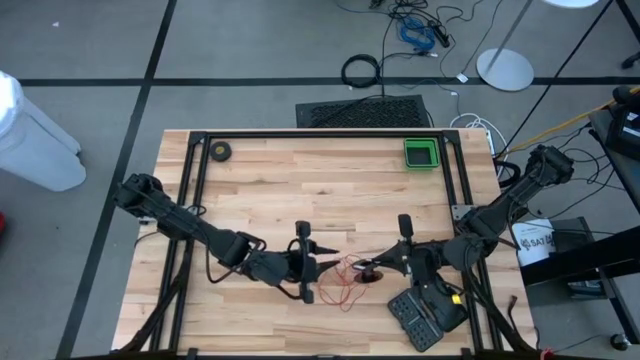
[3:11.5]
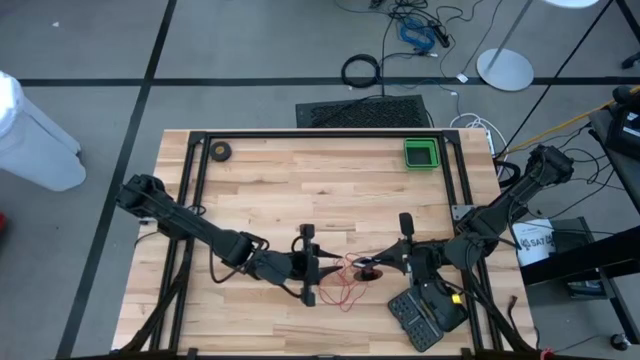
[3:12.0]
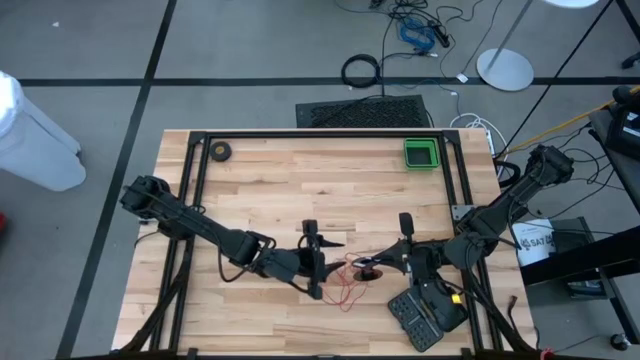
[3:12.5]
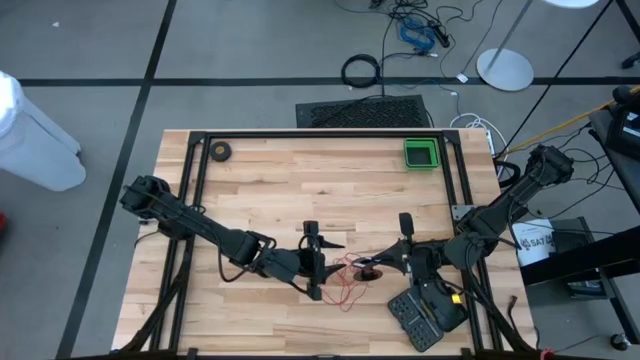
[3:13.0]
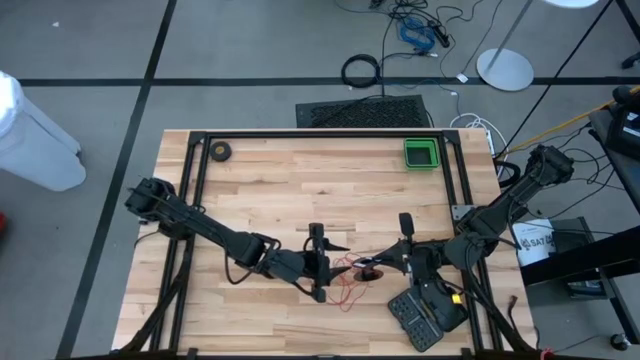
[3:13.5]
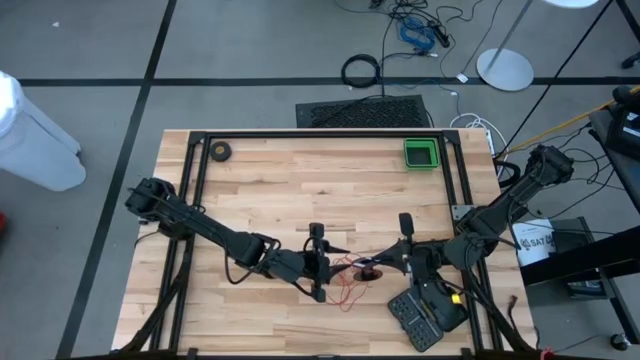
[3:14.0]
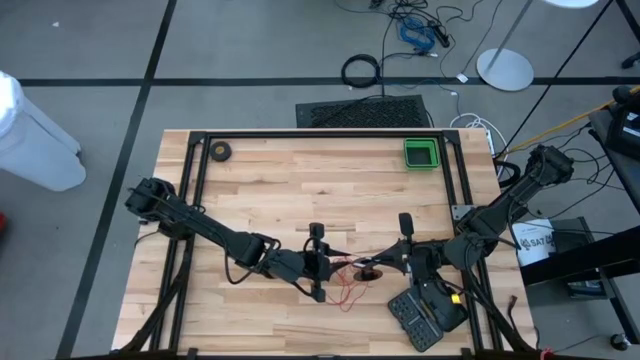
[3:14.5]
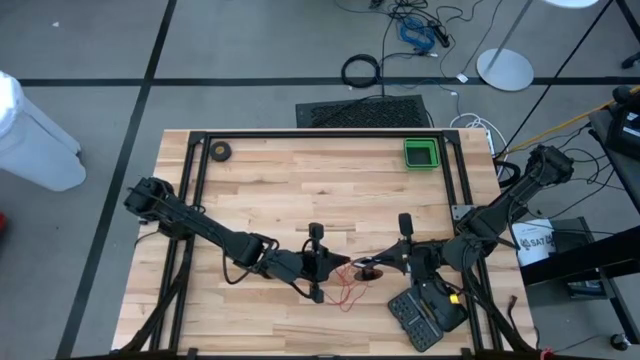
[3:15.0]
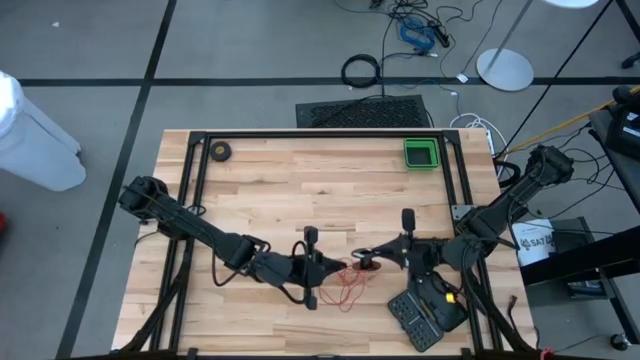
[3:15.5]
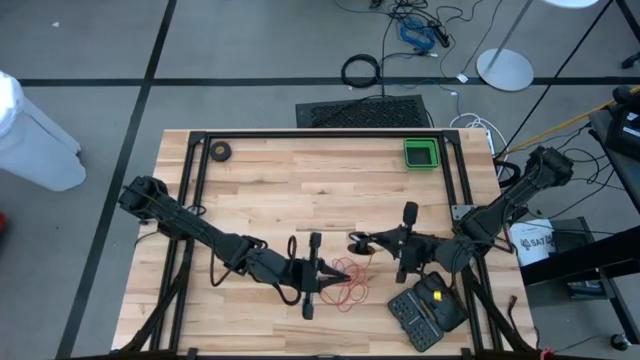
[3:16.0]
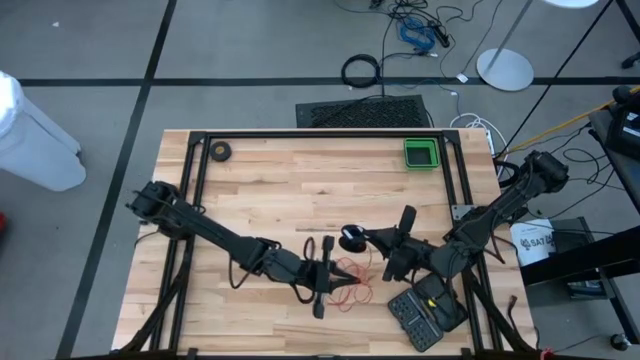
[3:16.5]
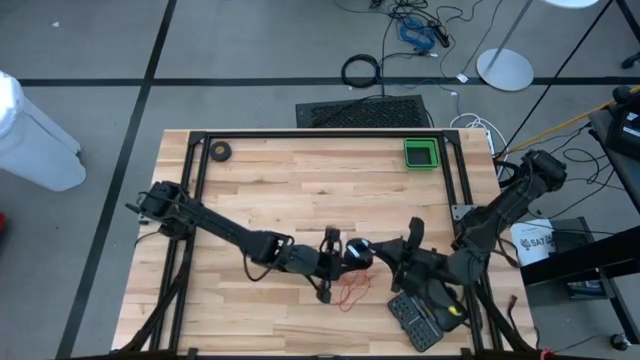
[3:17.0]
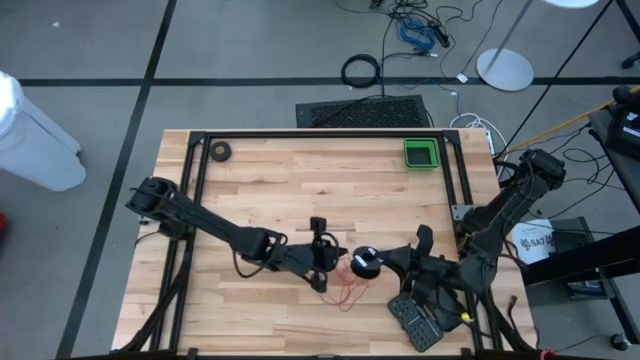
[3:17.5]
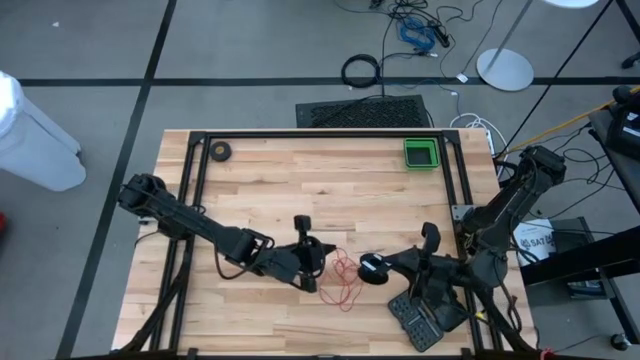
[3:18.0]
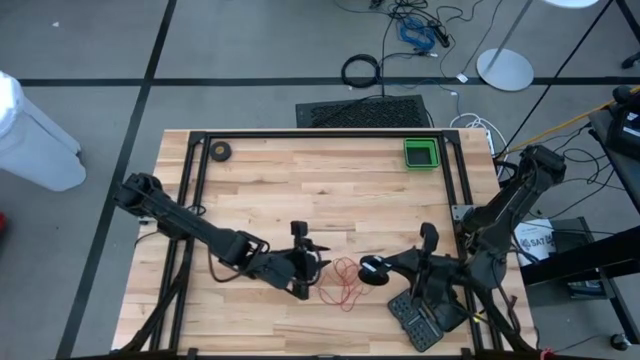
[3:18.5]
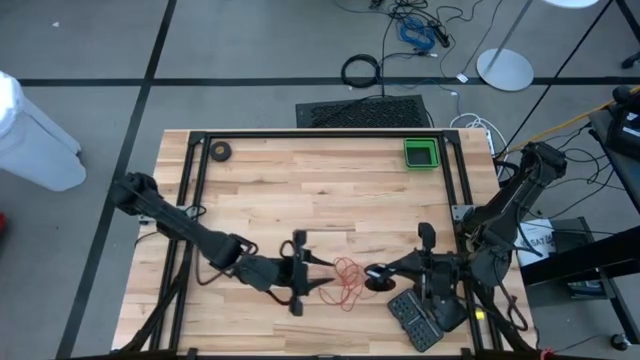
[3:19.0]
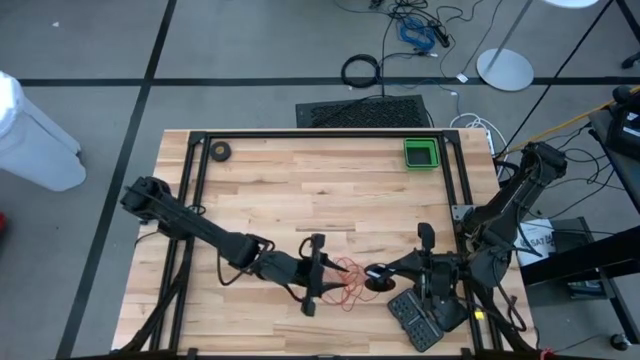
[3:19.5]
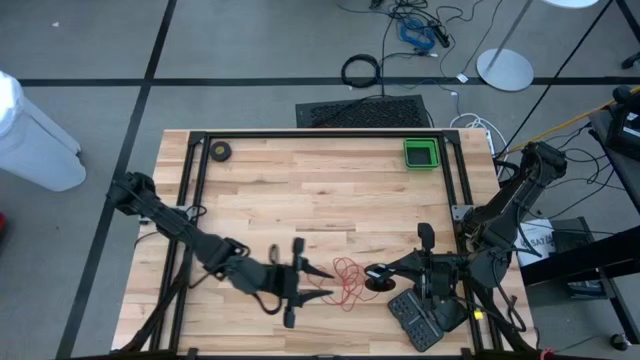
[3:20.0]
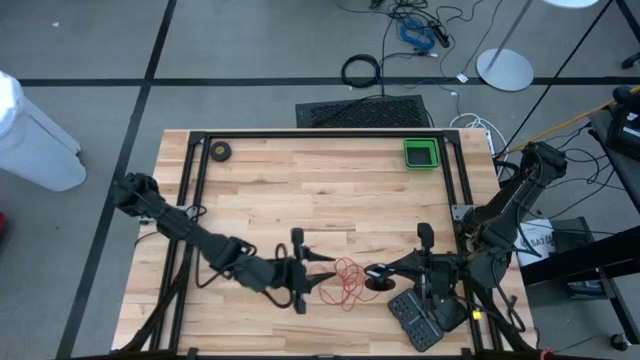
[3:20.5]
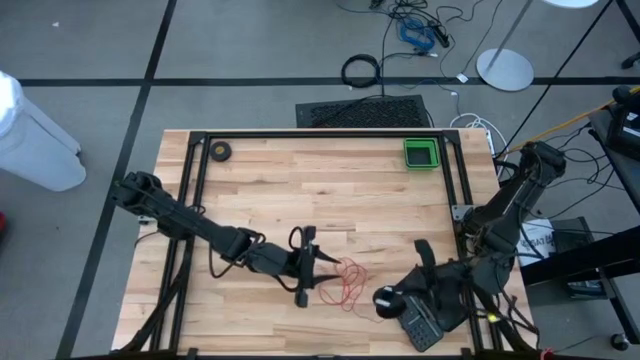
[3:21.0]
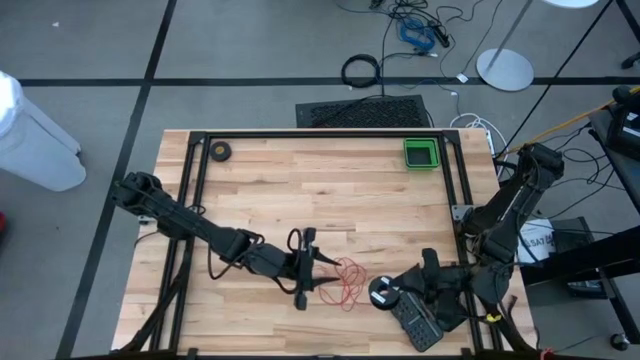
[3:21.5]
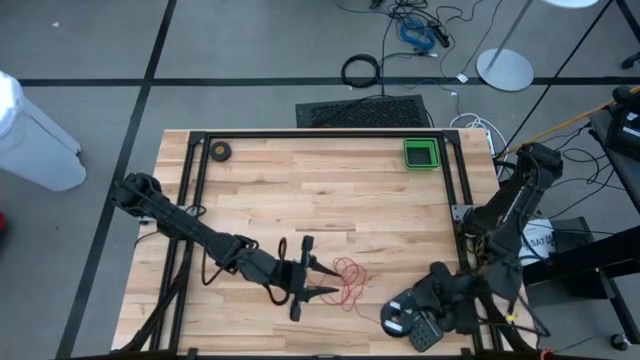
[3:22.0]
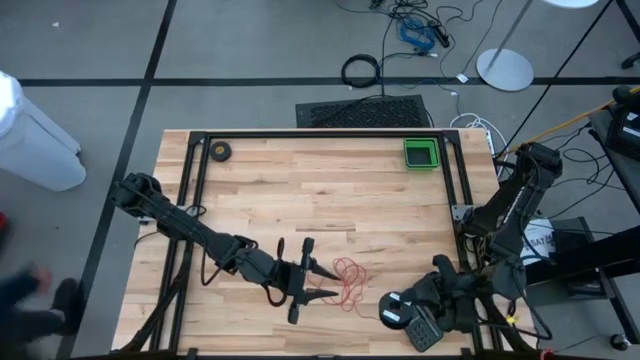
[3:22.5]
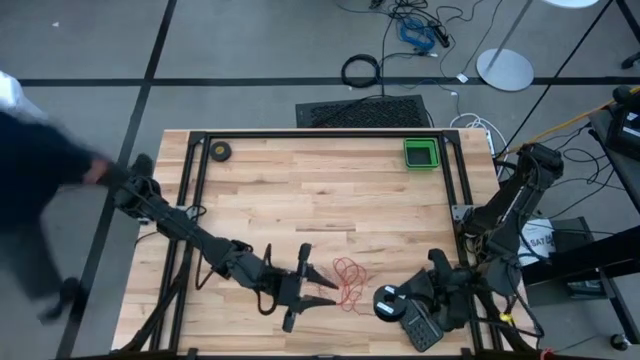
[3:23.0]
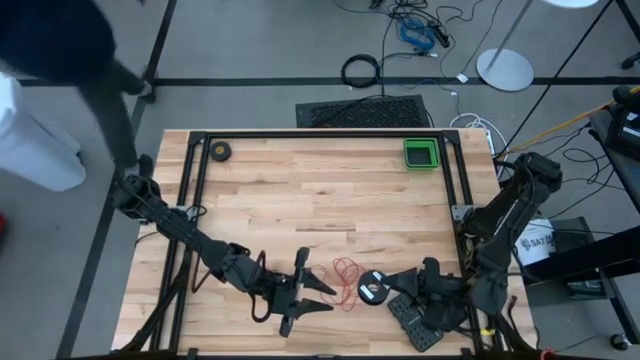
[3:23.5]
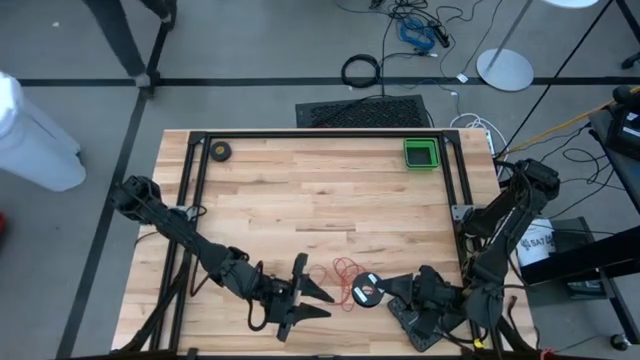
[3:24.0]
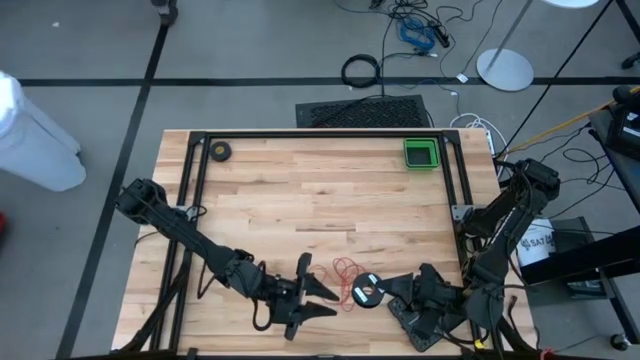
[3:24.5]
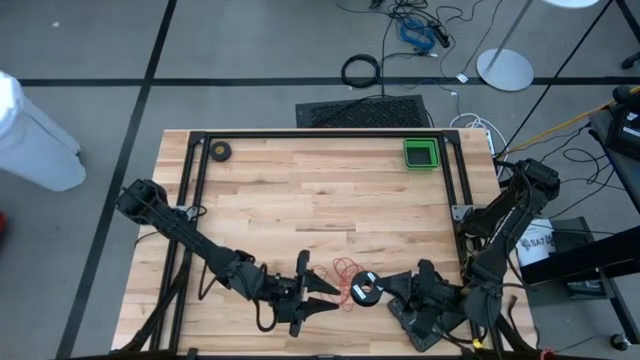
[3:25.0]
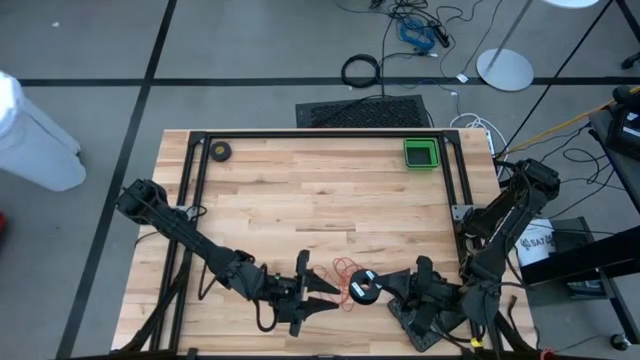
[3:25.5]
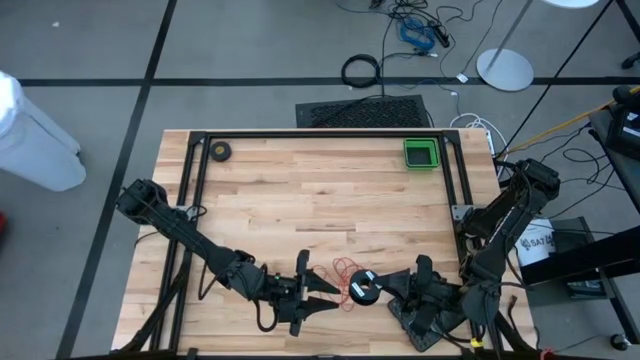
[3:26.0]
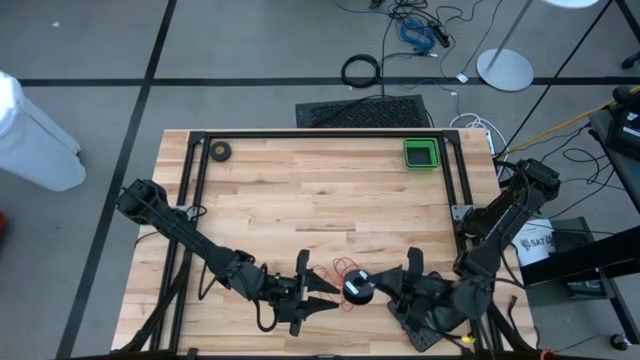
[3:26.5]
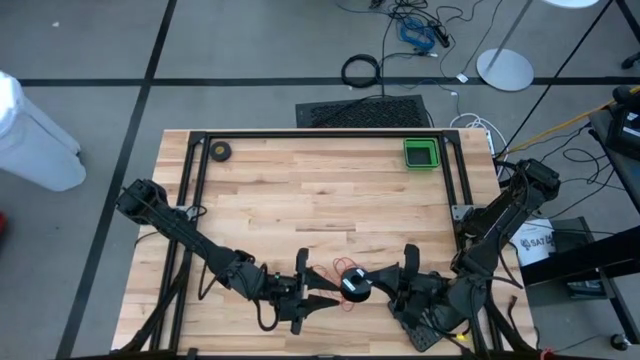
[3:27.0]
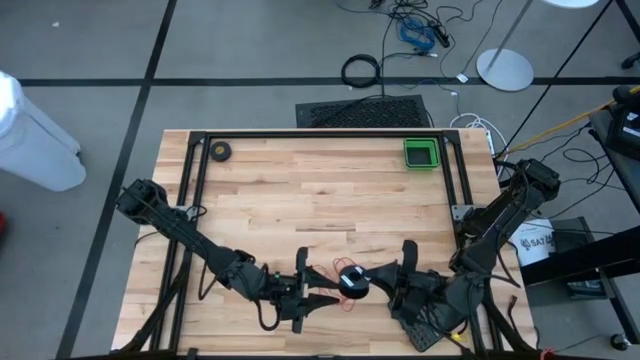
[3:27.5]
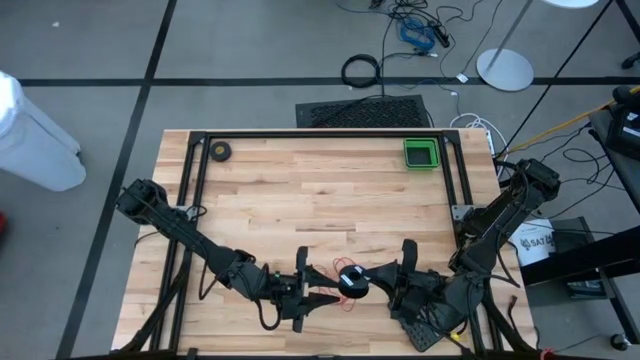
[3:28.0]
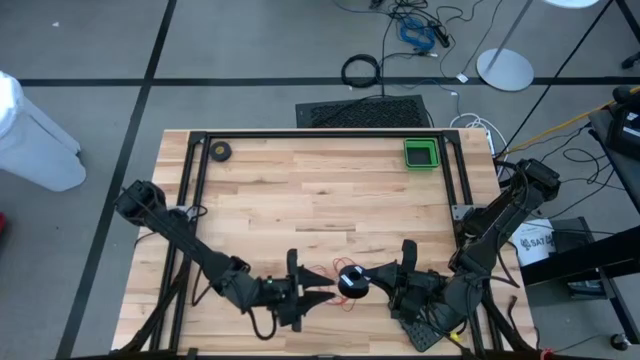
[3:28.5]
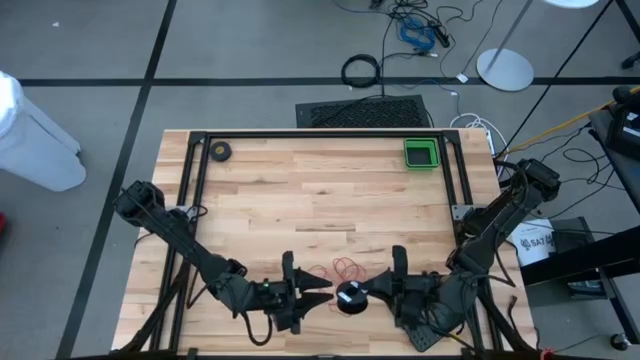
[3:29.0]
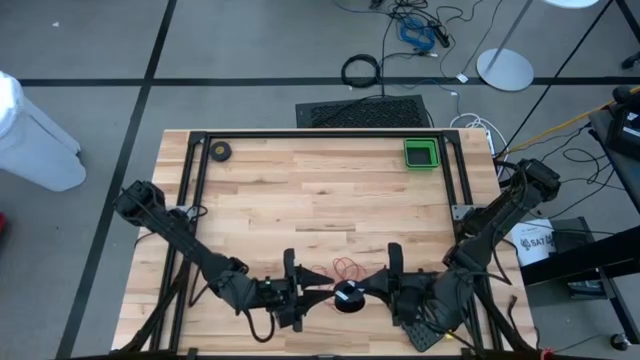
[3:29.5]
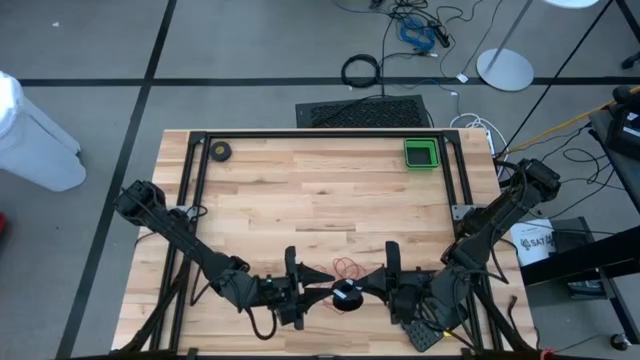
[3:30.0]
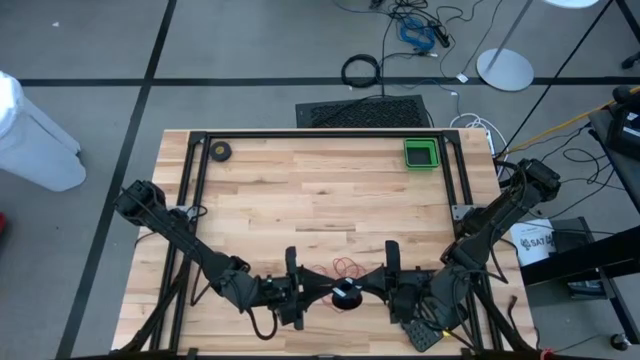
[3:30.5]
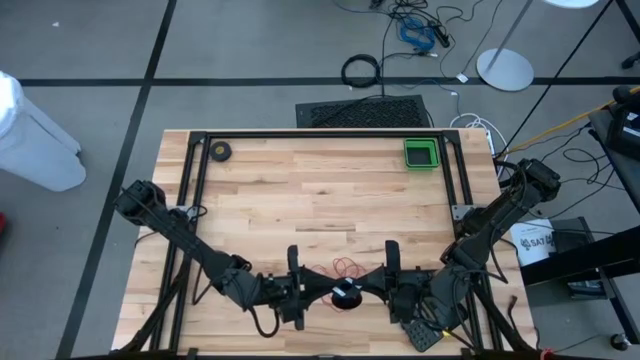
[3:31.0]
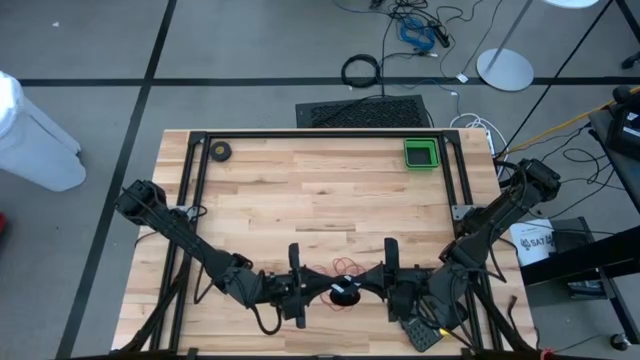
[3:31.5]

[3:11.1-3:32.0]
Task: Coil cords
Uncoil the red wire from the spool
